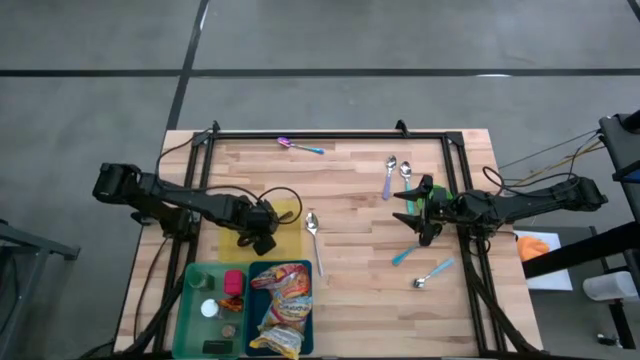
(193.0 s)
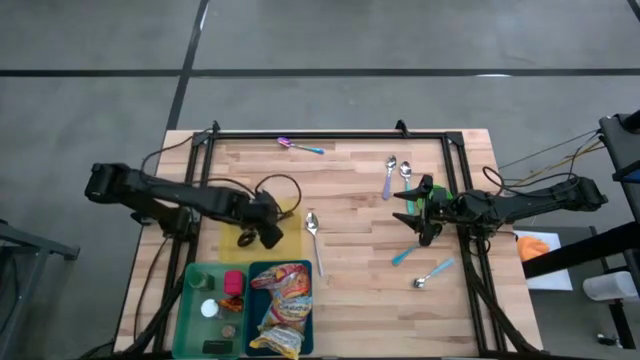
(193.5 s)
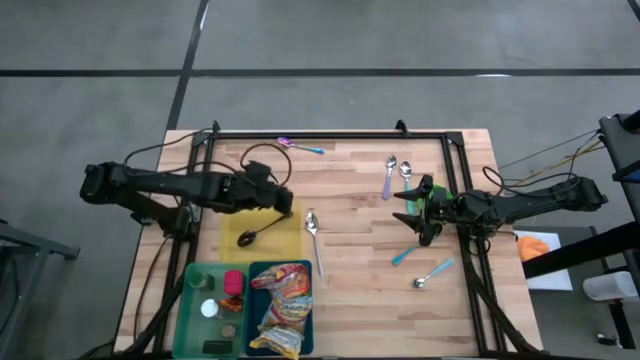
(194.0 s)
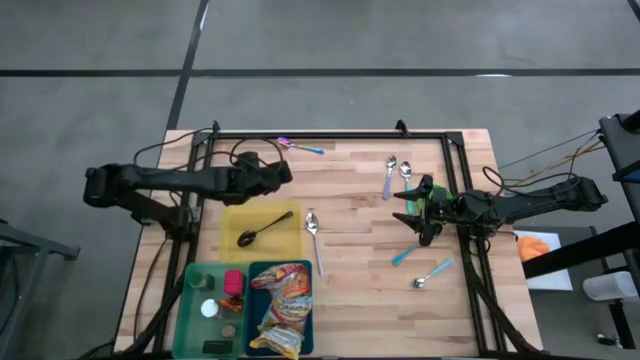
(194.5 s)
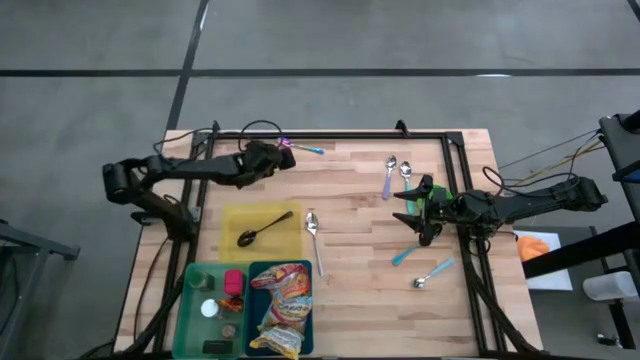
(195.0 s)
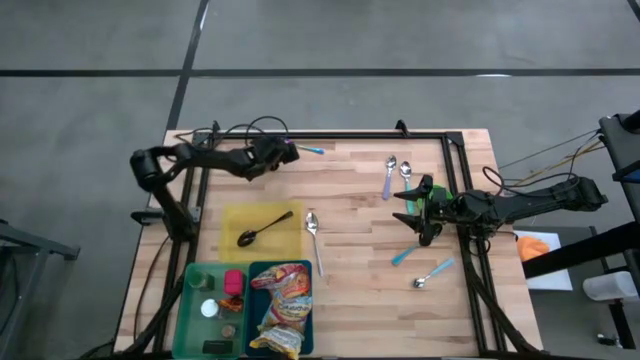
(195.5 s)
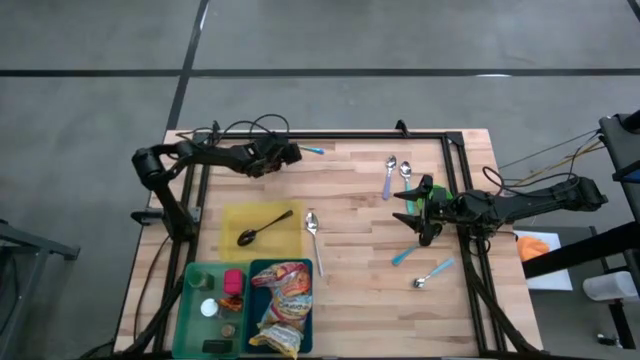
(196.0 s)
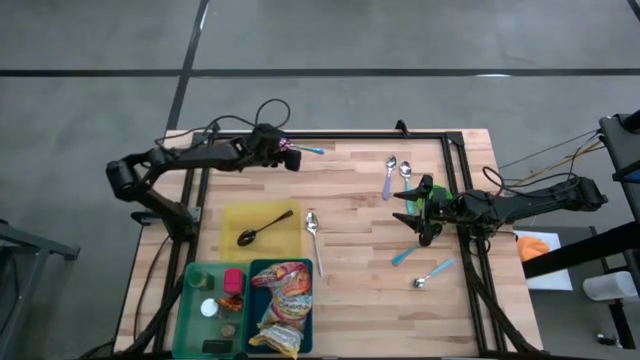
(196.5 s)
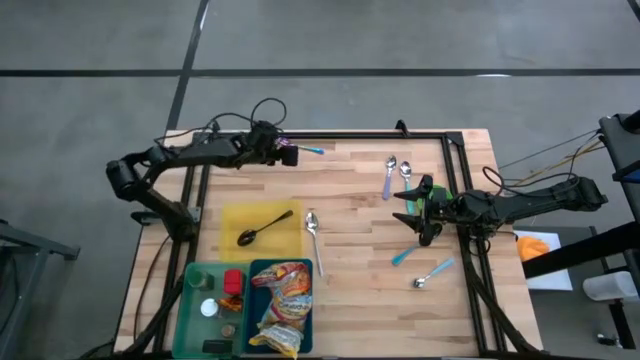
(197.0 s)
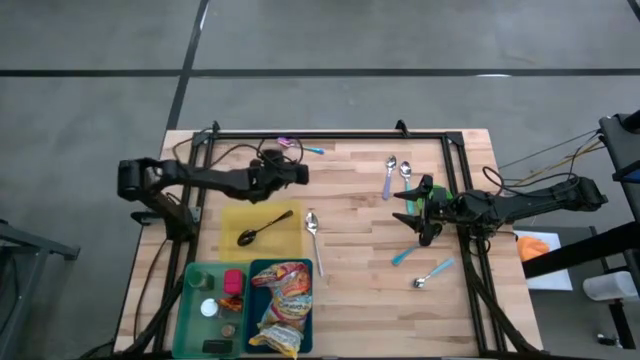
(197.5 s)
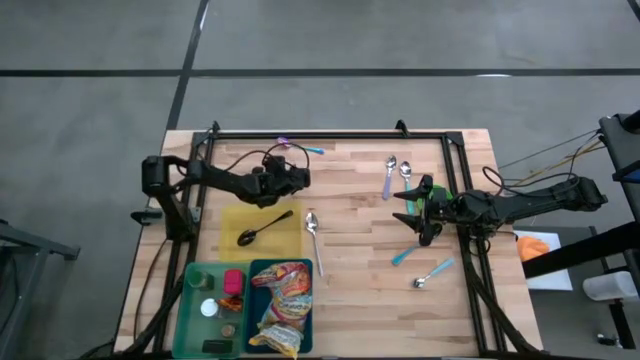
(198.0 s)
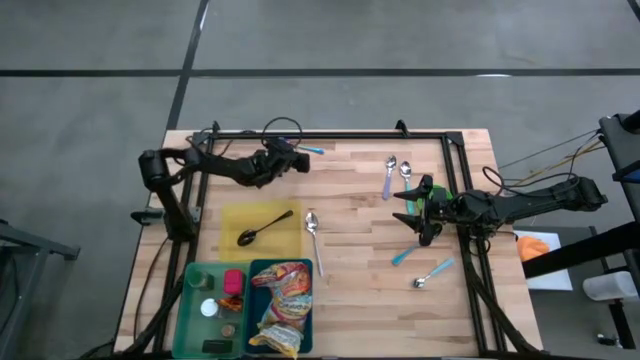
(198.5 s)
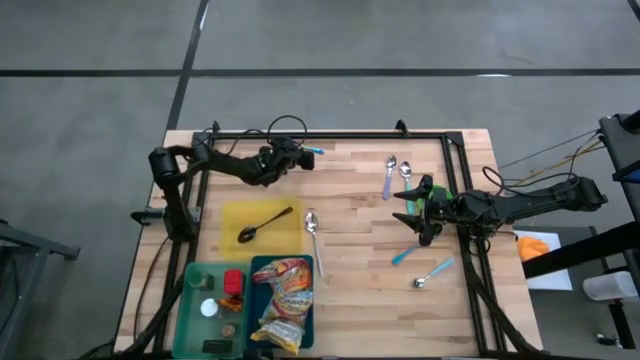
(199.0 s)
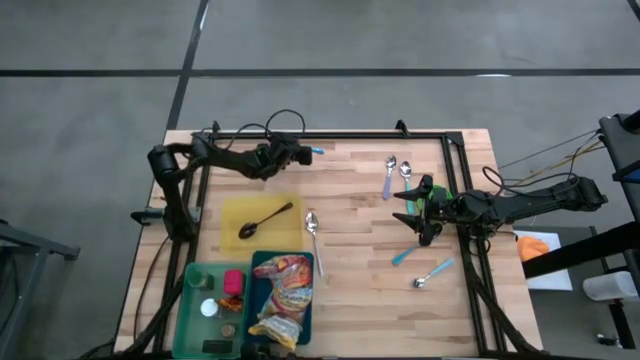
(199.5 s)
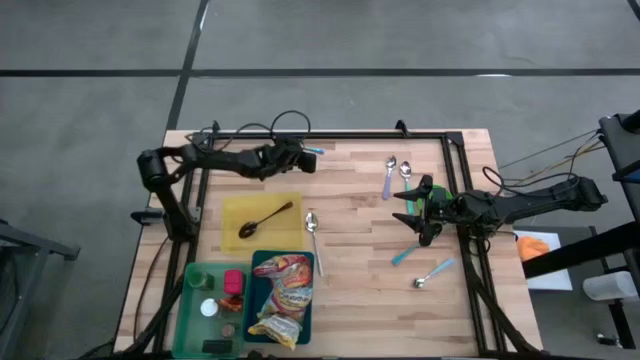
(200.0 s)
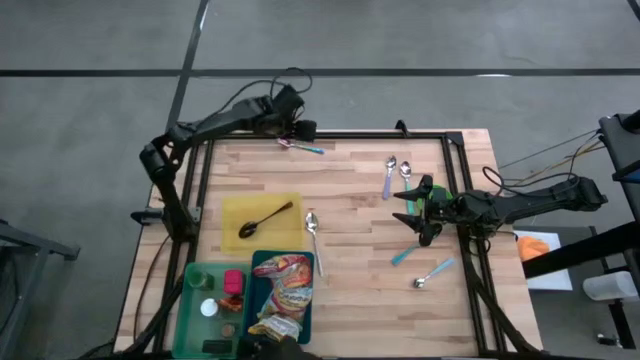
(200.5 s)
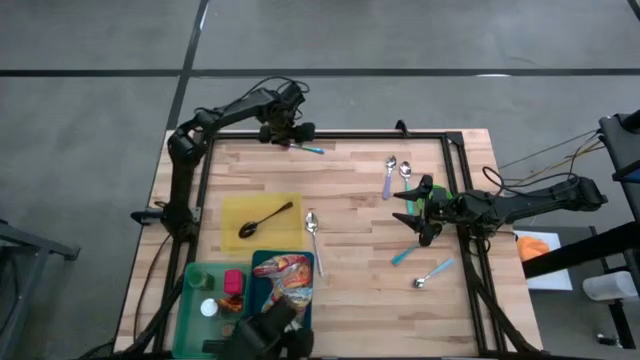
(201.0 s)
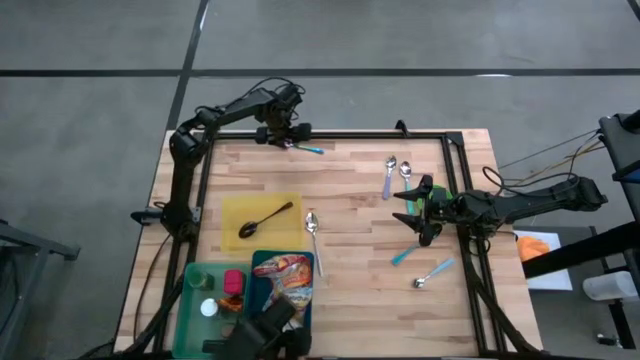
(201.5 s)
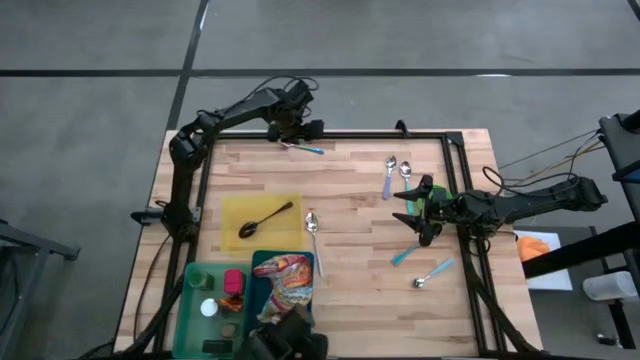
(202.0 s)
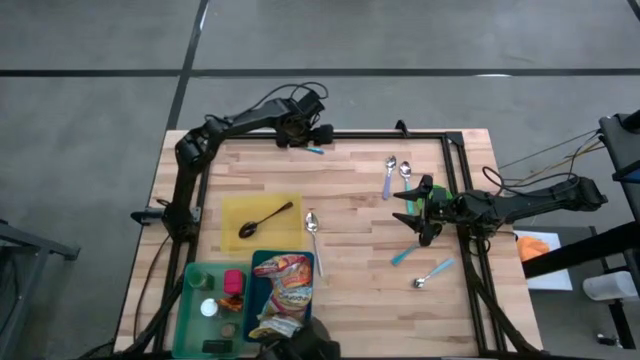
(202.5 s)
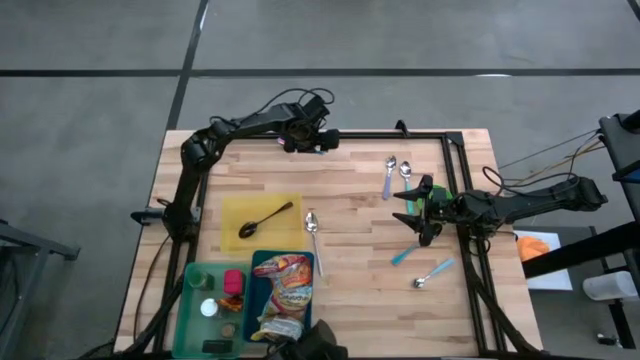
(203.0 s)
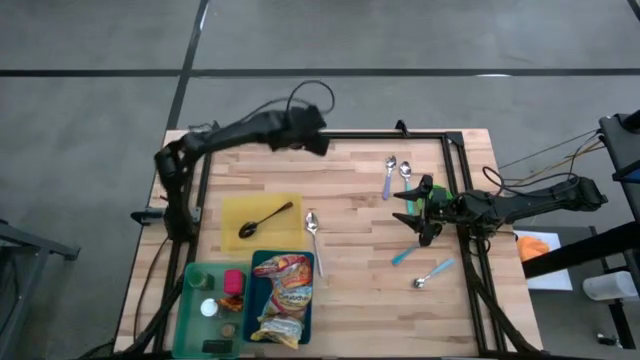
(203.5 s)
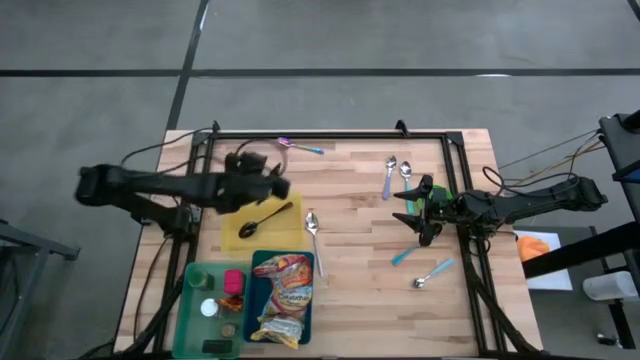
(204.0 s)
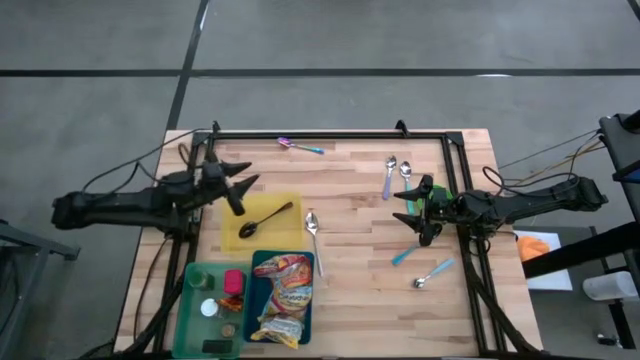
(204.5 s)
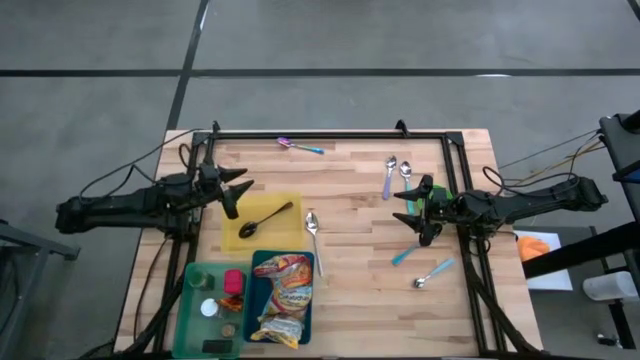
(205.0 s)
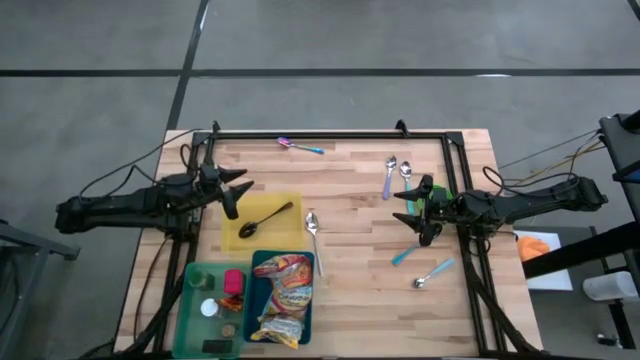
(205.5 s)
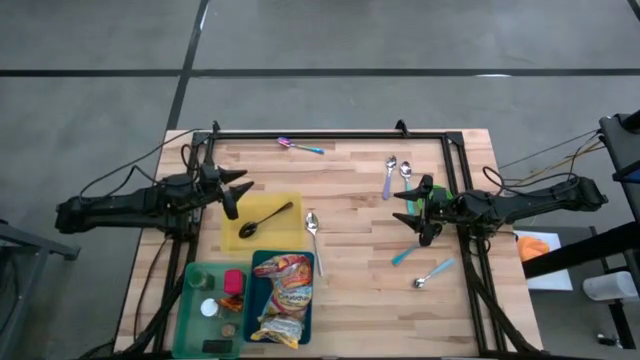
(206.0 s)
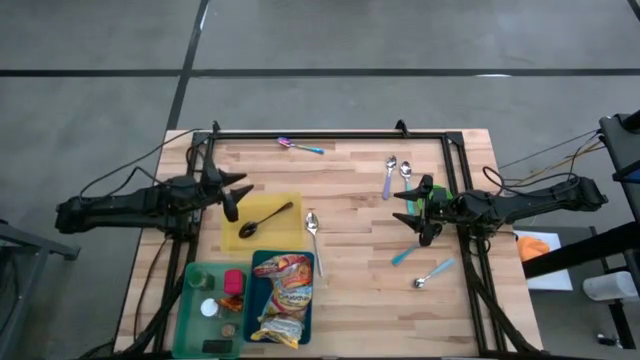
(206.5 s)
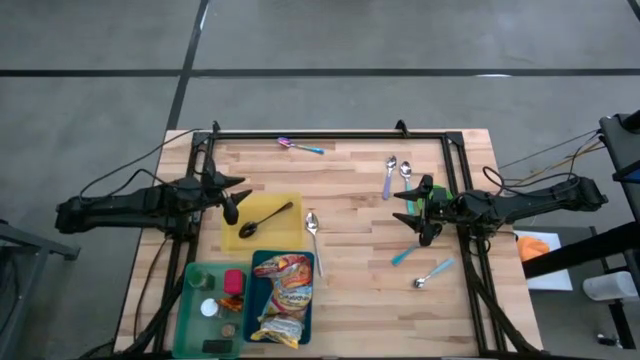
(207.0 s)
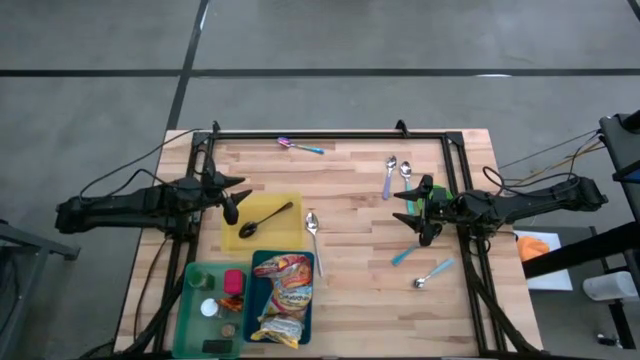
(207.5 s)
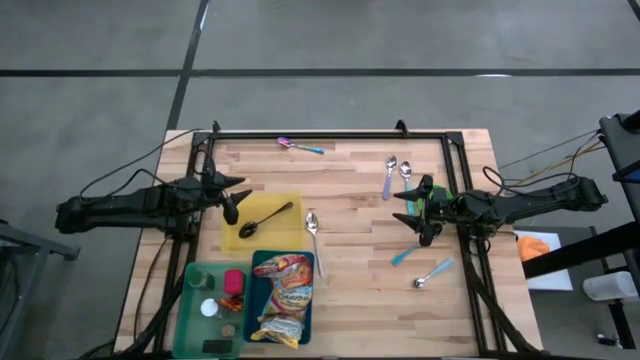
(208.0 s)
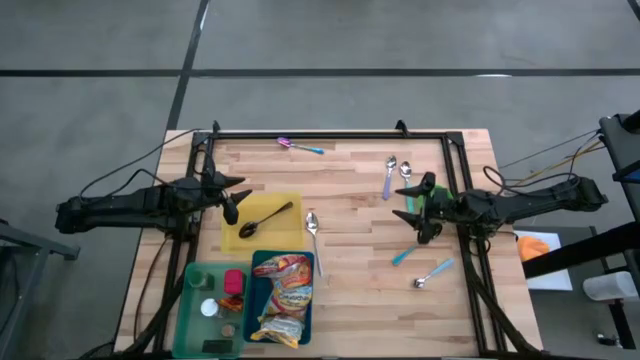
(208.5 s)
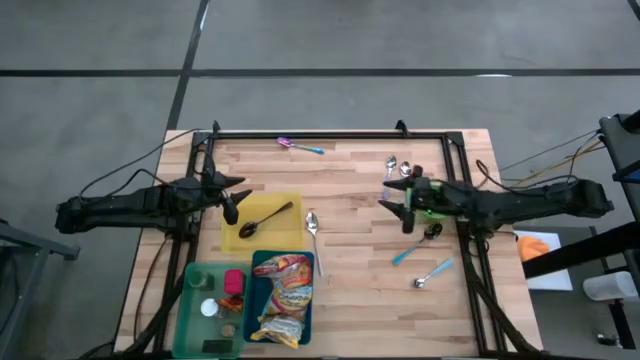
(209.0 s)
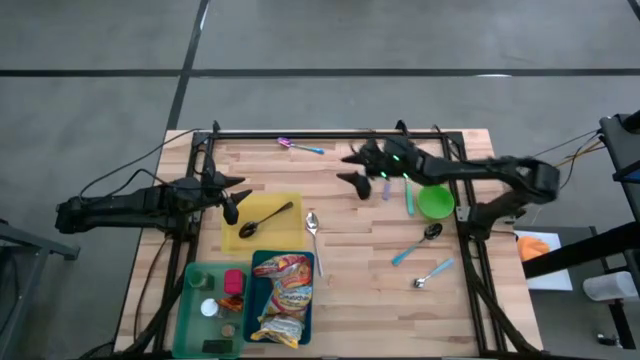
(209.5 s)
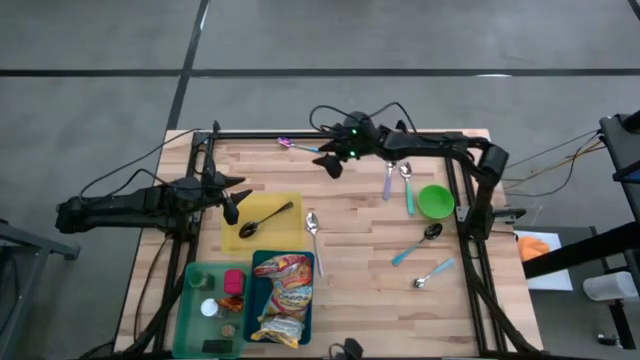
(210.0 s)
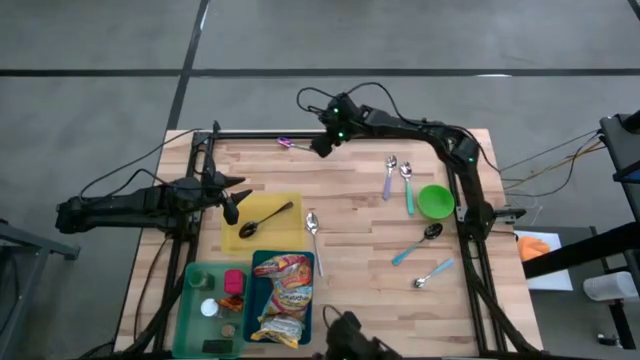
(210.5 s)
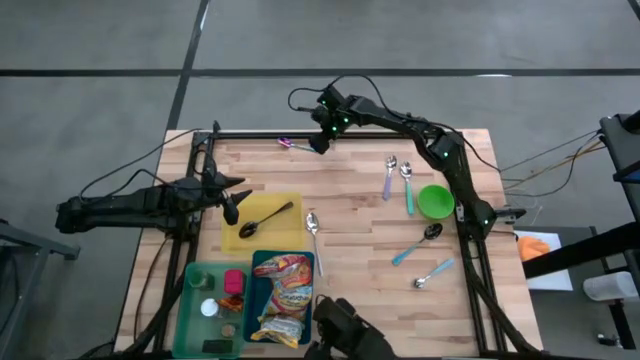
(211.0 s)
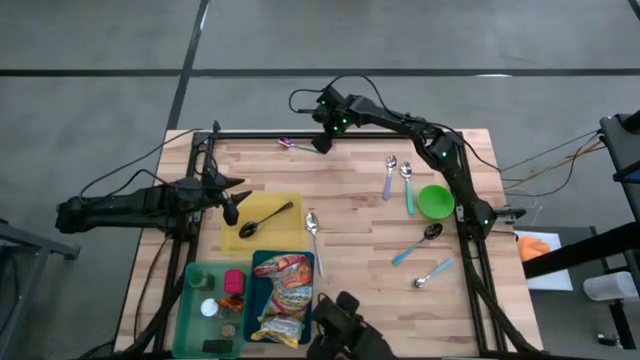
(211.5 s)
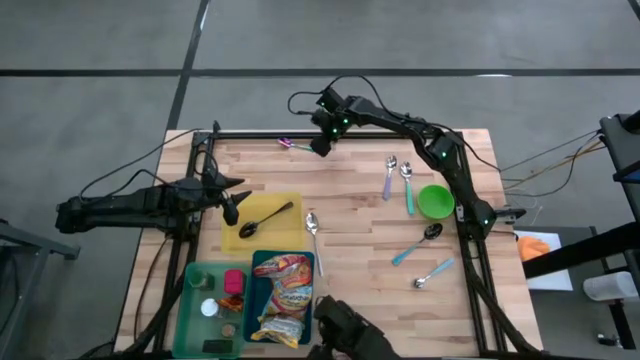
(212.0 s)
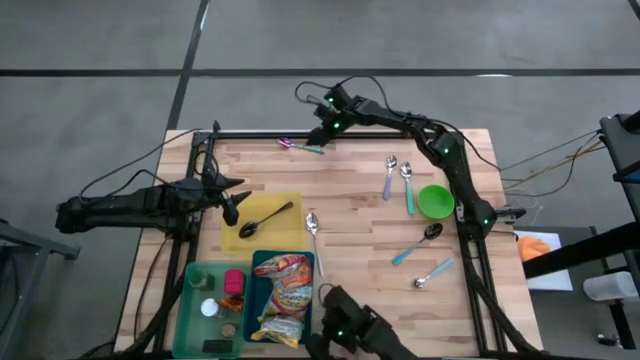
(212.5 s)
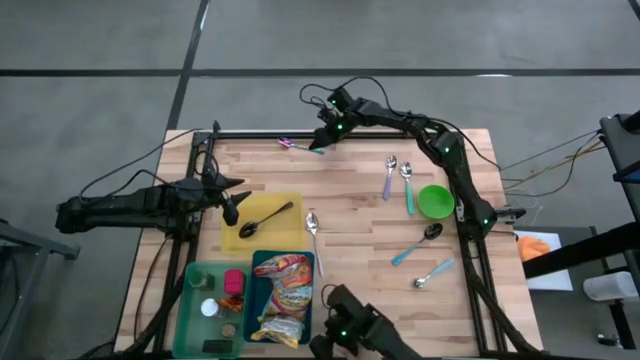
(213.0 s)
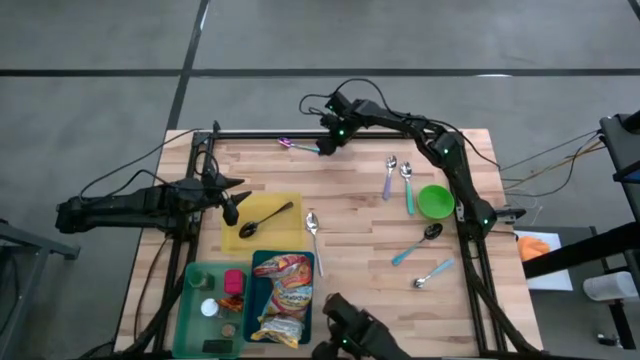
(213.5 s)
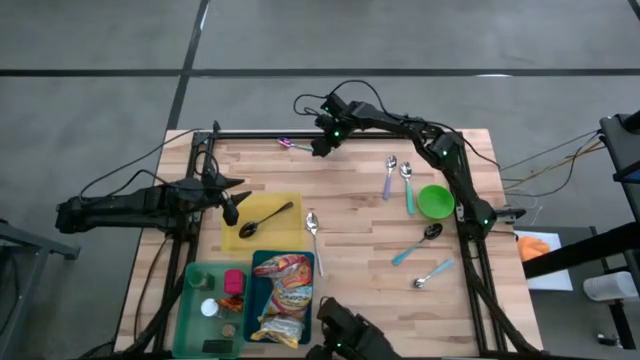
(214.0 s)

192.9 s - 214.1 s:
Put the purple spoon into the yellow bin
